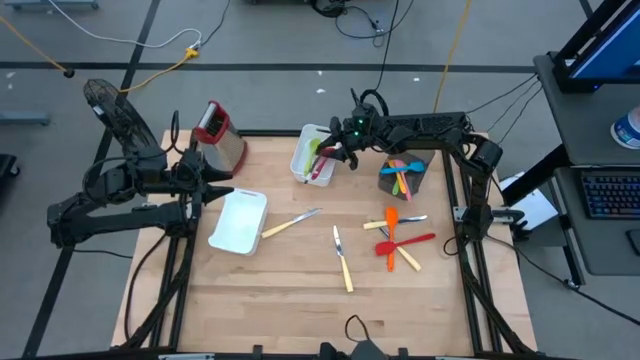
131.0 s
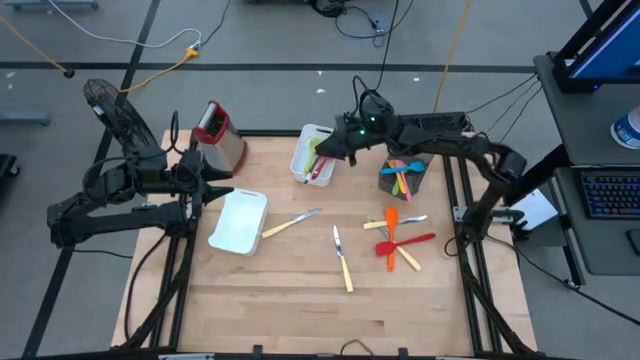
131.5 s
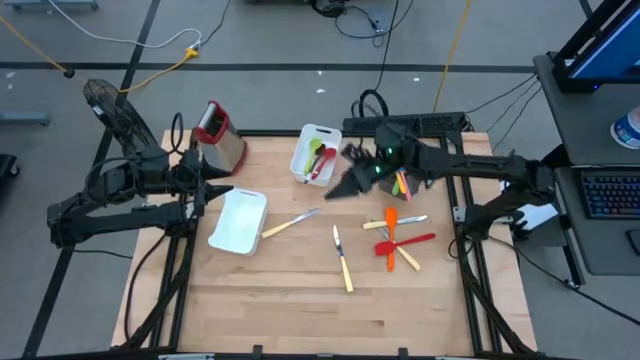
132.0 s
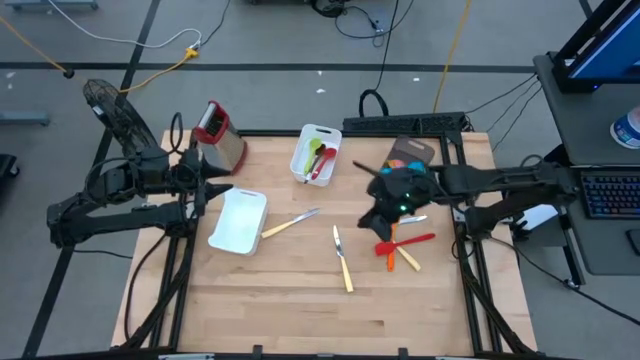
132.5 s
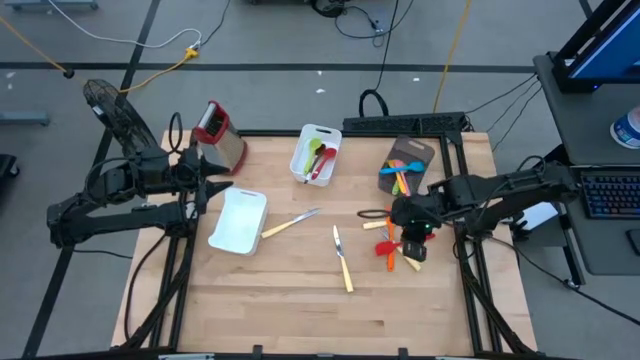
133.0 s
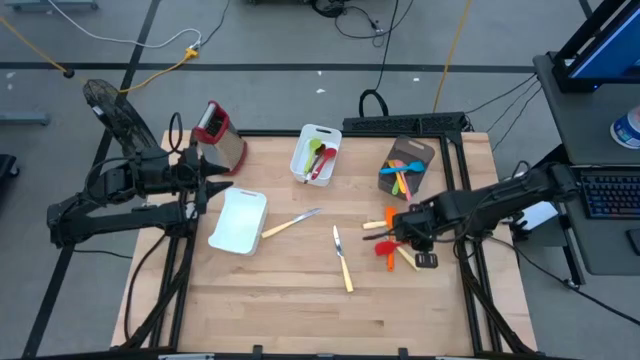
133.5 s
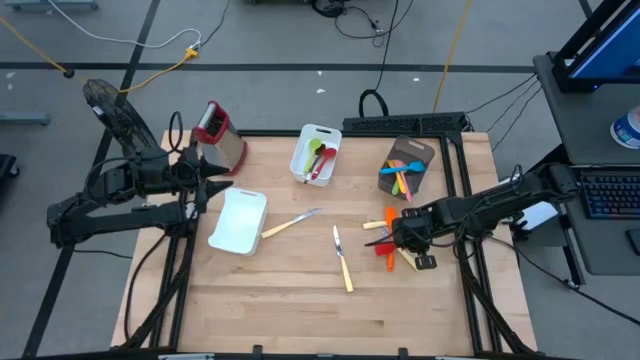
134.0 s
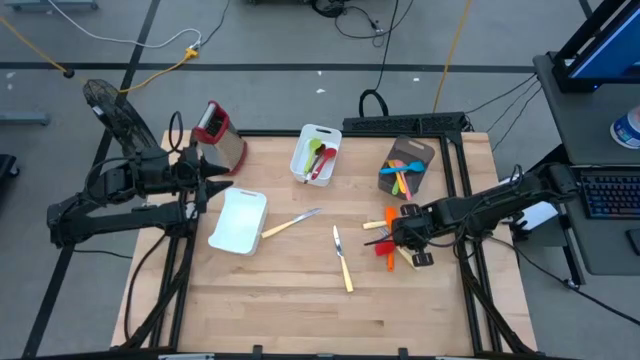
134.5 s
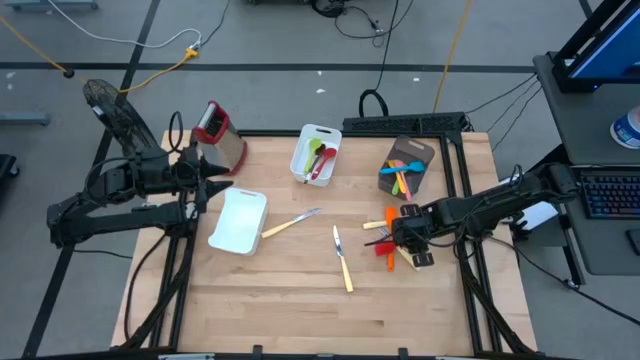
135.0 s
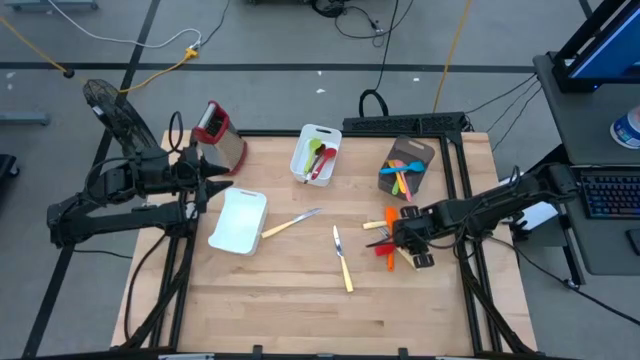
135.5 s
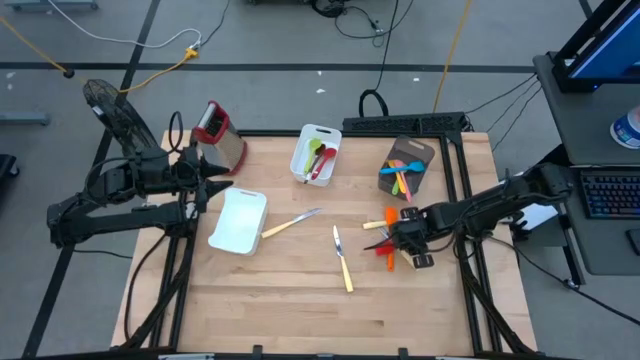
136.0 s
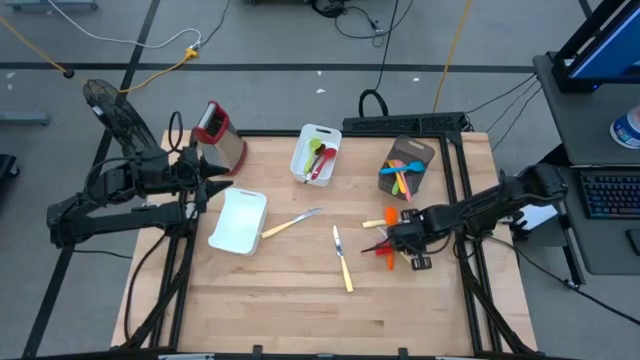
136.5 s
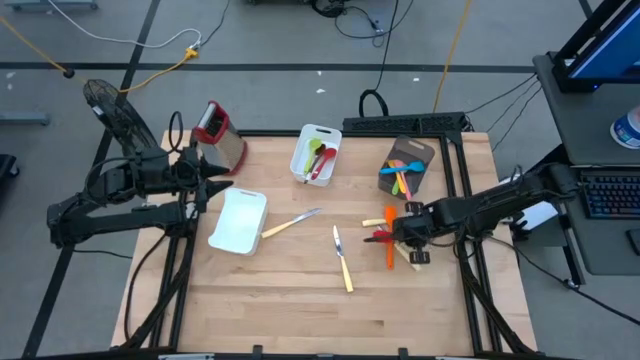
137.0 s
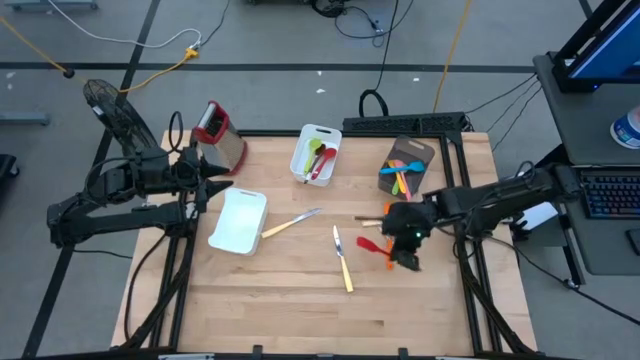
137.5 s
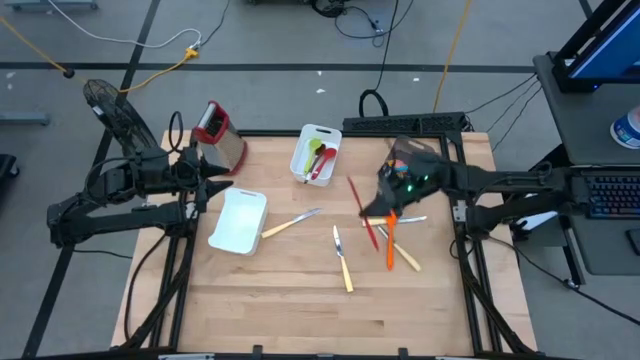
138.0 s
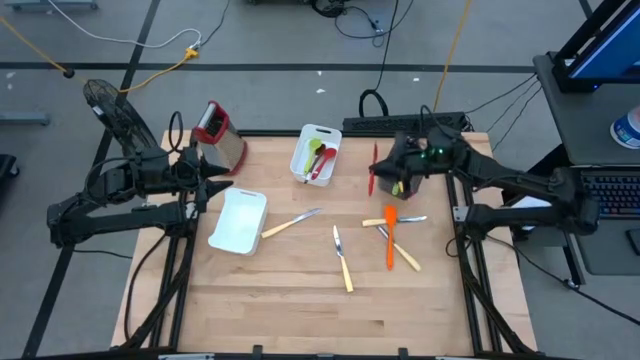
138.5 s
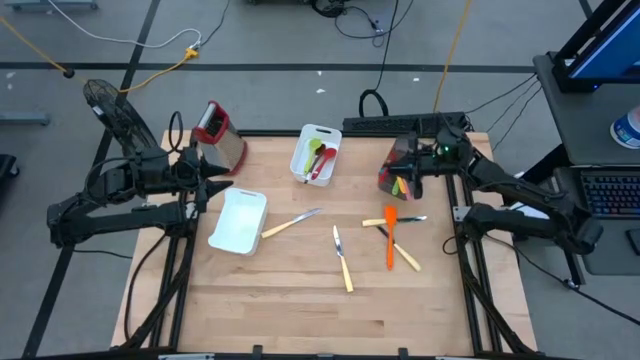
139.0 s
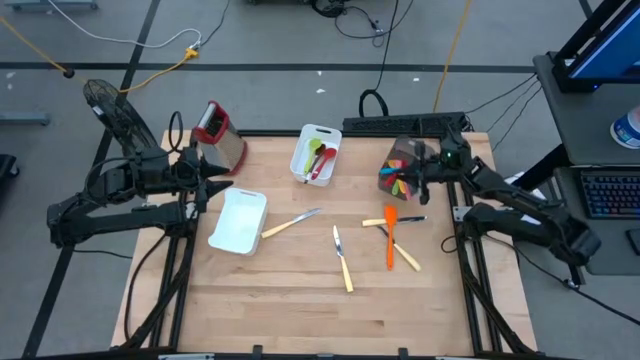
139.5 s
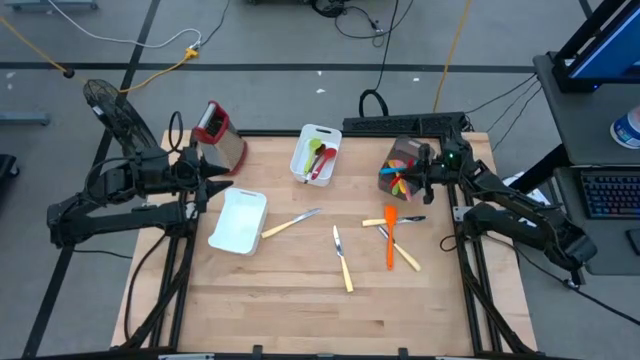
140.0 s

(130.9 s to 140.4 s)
Task: Pick & Place Kitchen Items
Put the red spatula into the black bin

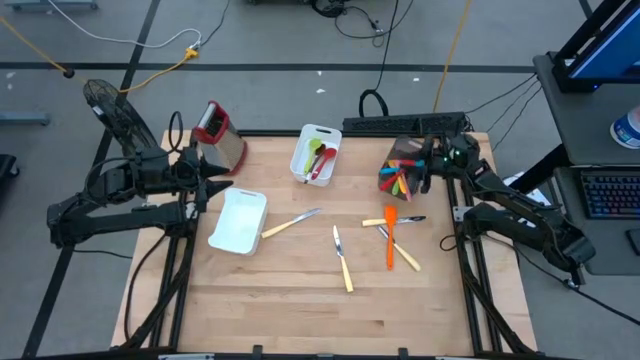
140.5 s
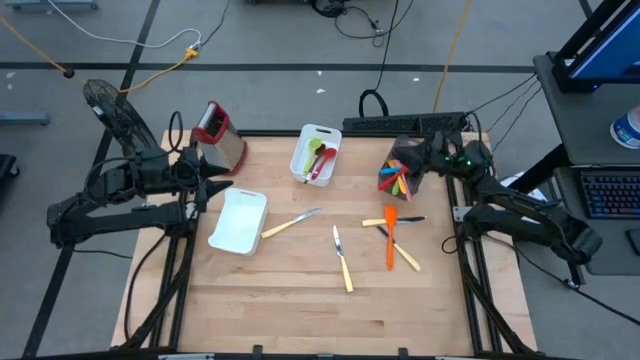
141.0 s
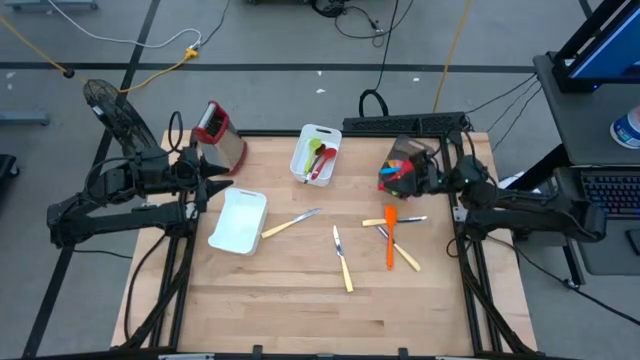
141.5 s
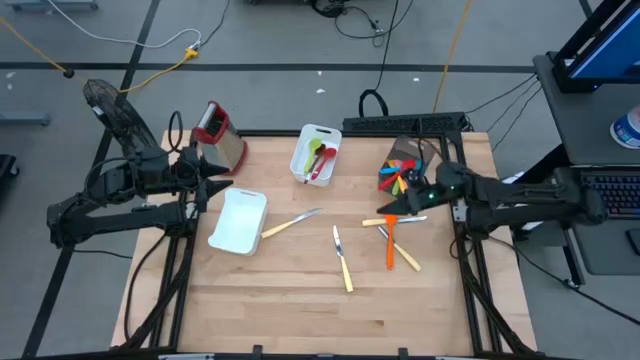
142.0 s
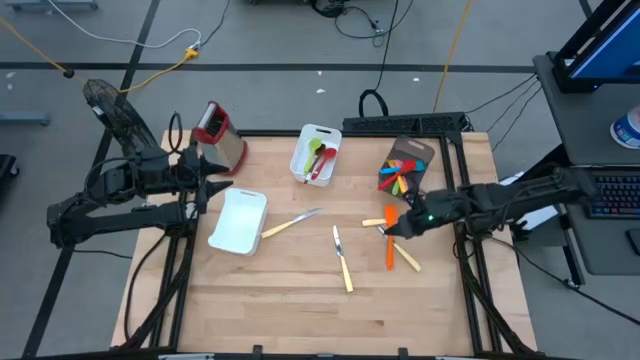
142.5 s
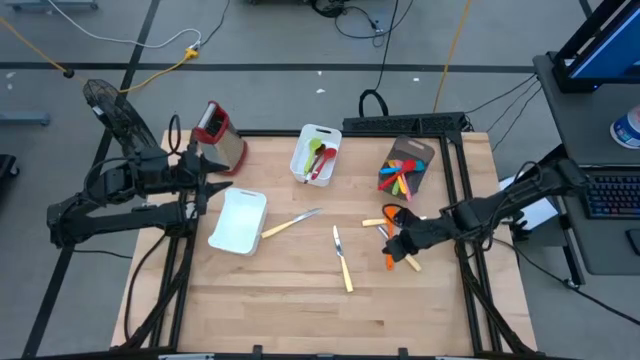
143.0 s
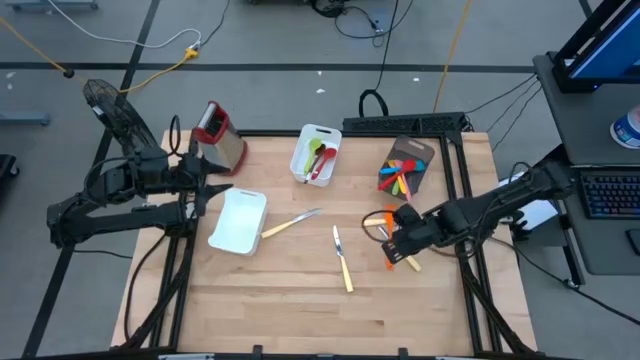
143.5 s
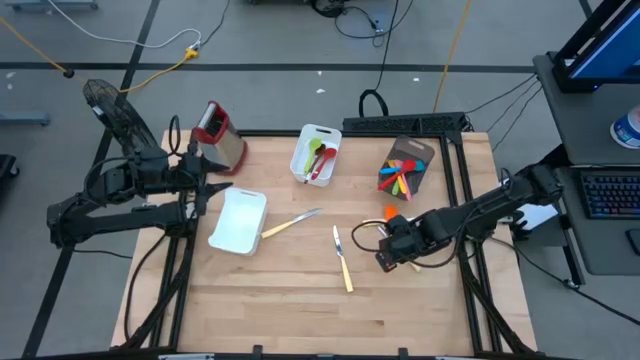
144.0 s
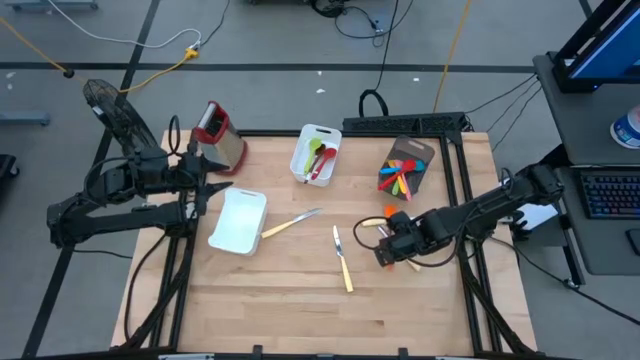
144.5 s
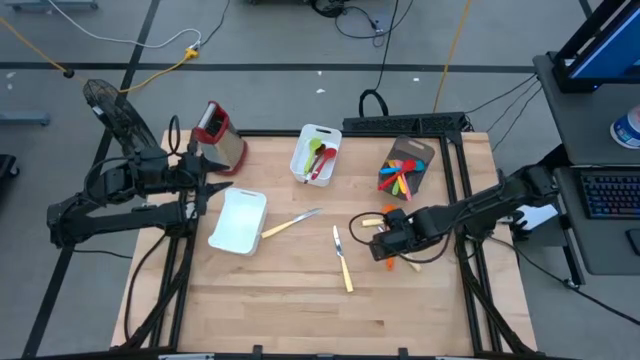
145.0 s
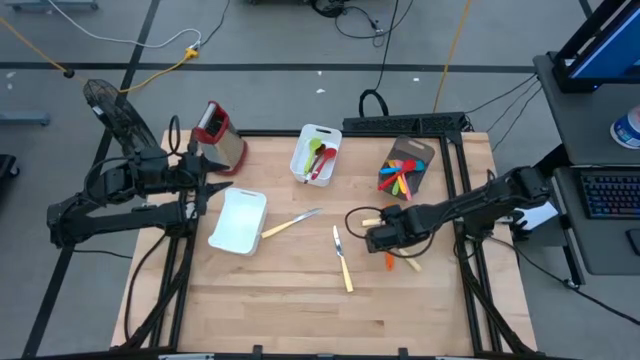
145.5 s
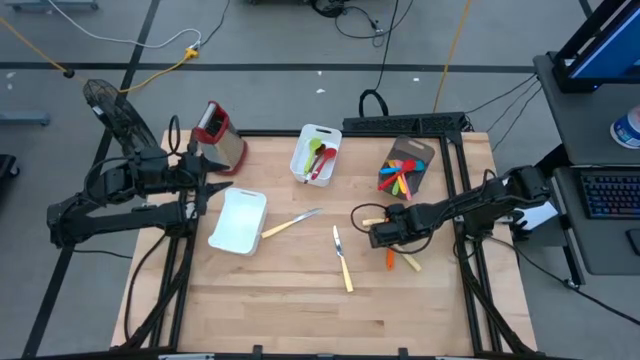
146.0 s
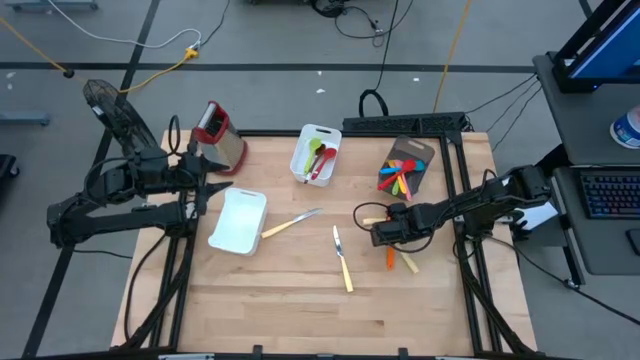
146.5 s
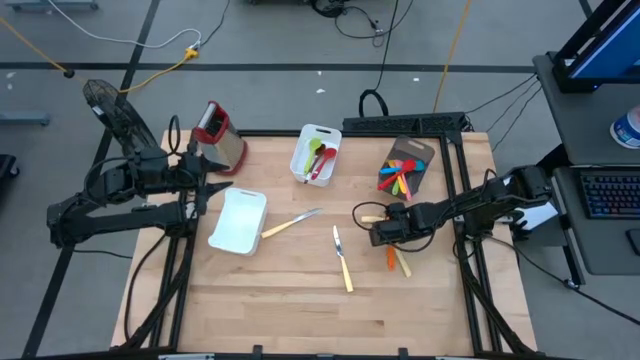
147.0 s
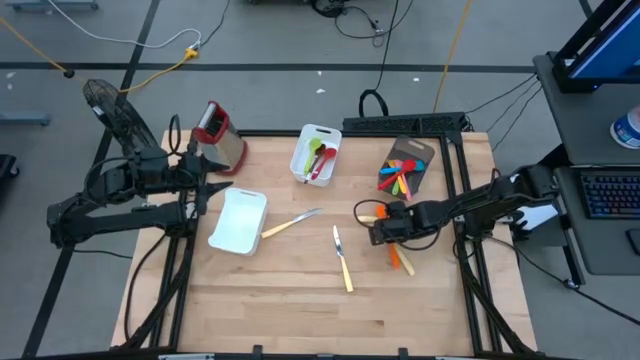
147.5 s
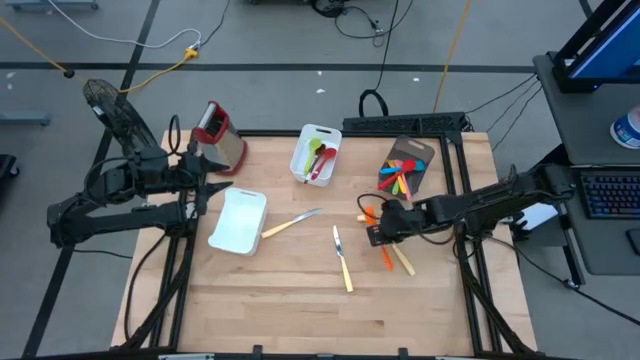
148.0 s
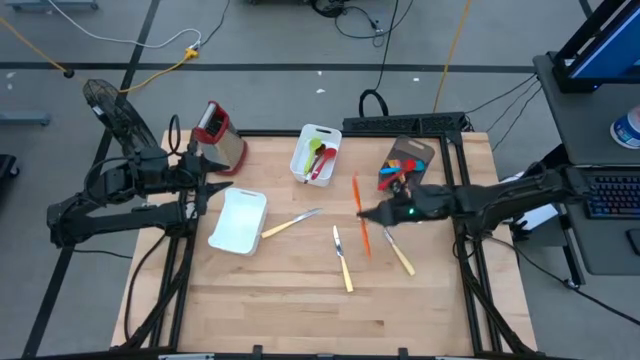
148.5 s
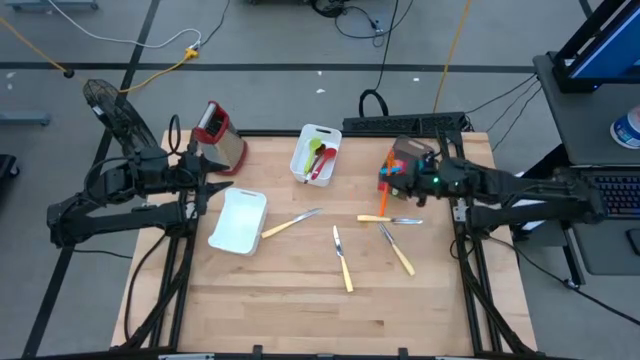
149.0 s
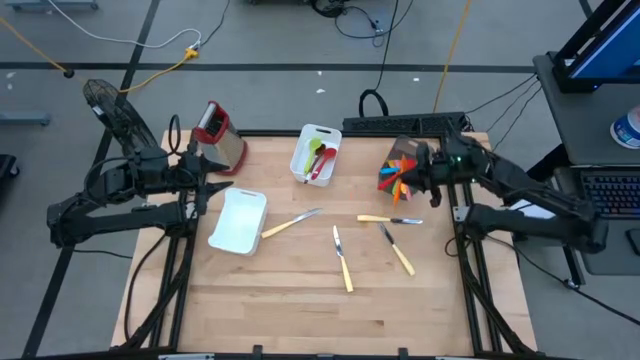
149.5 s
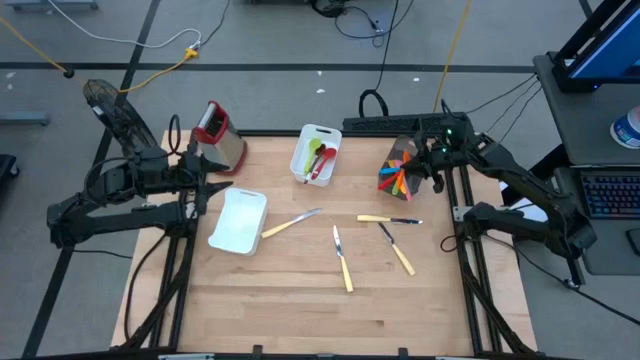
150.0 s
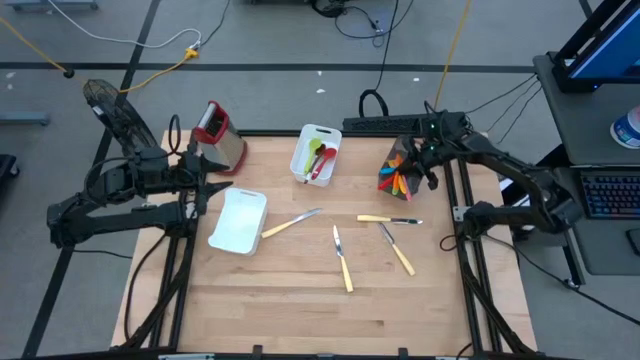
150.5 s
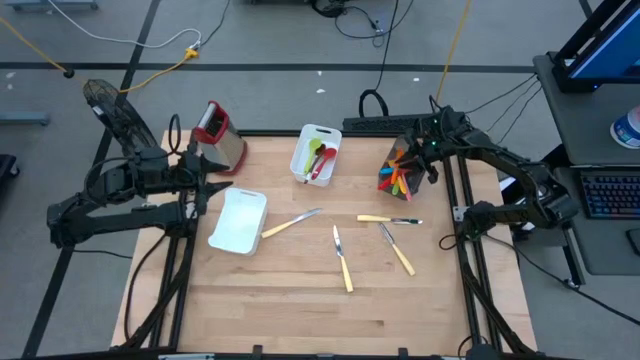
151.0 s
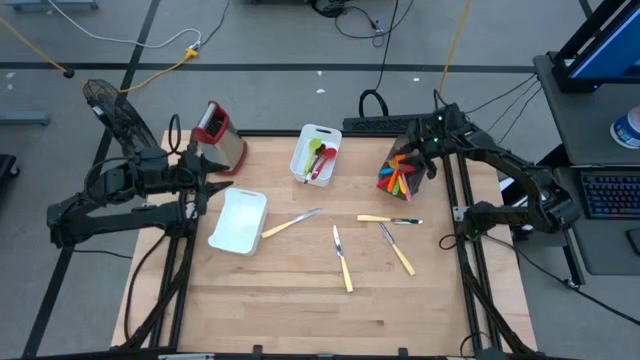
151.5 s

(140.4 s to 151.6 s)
Put the orange spatula into the black bin
